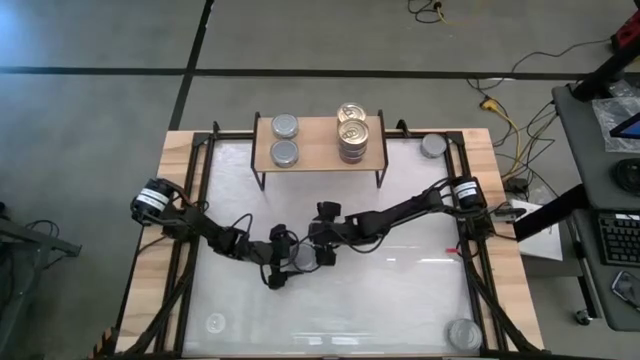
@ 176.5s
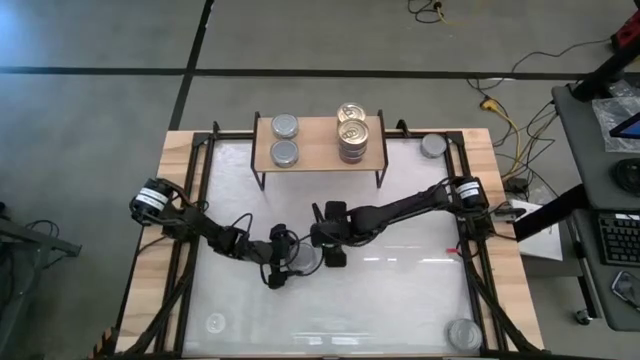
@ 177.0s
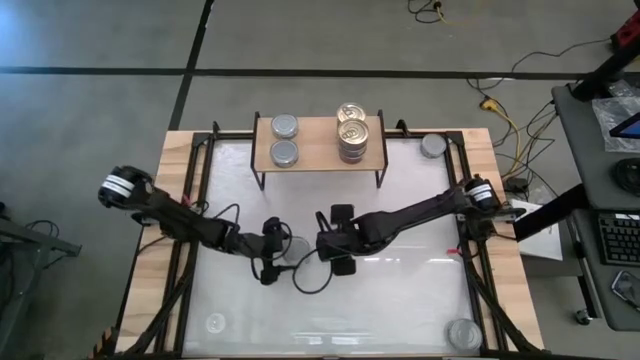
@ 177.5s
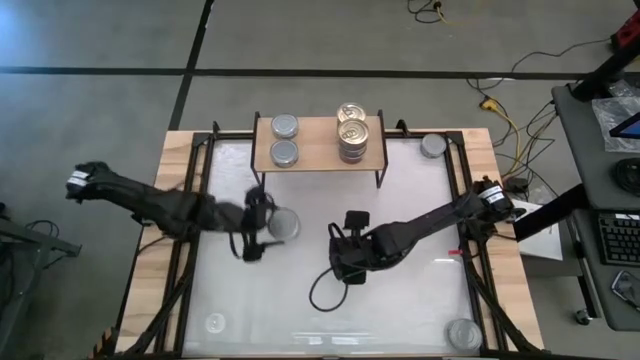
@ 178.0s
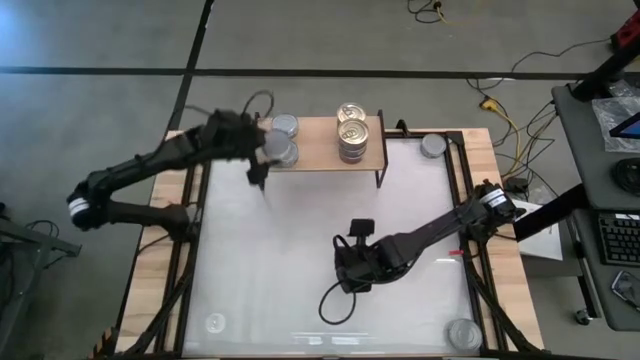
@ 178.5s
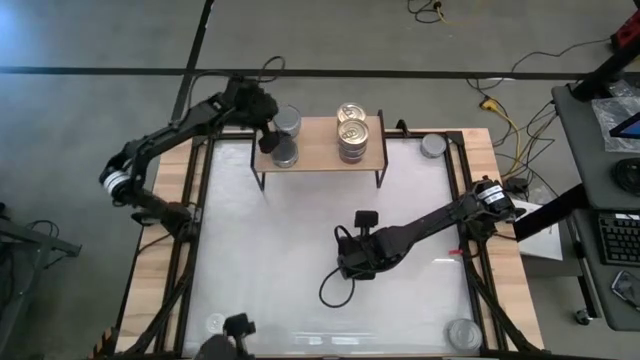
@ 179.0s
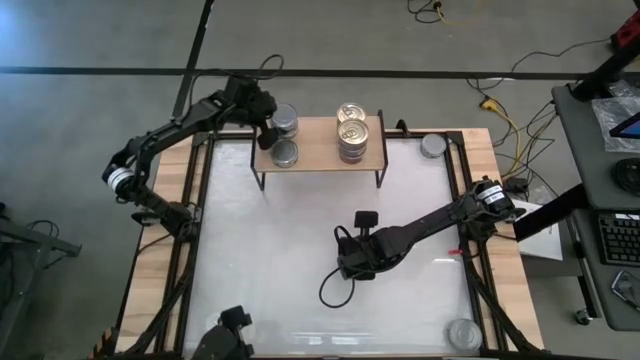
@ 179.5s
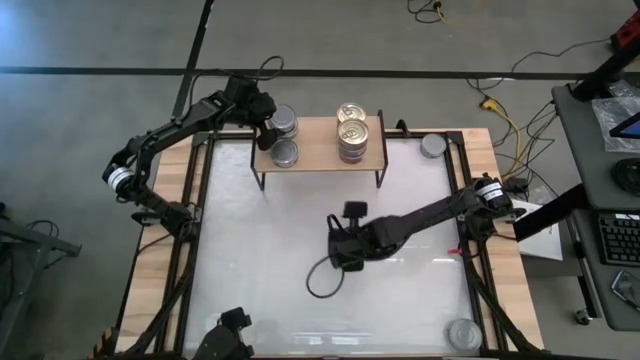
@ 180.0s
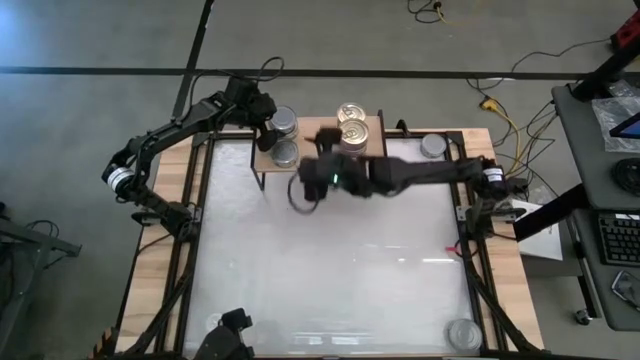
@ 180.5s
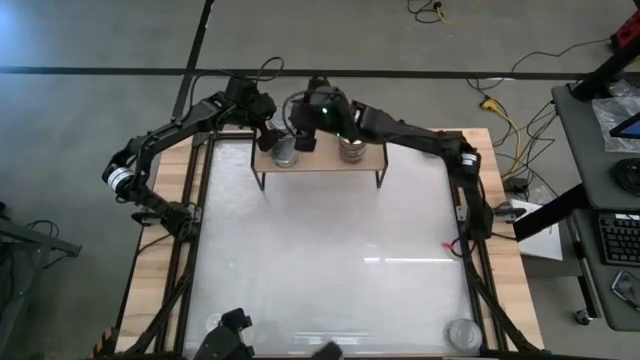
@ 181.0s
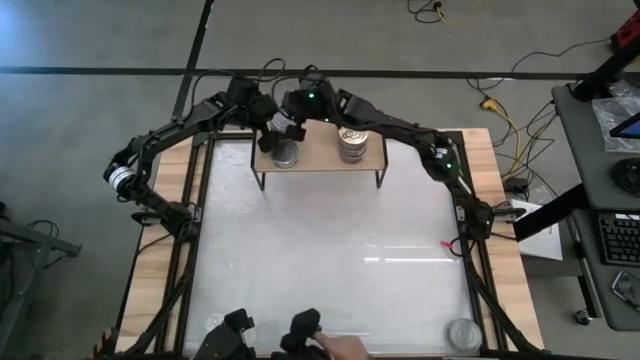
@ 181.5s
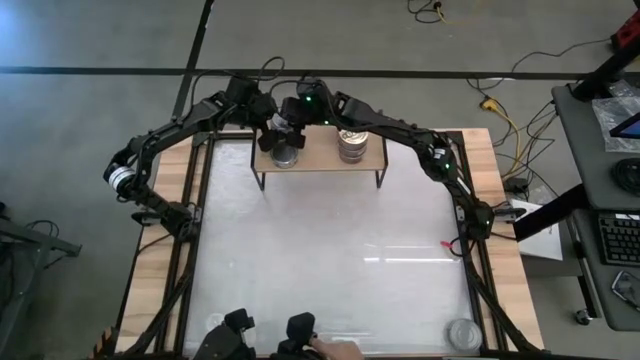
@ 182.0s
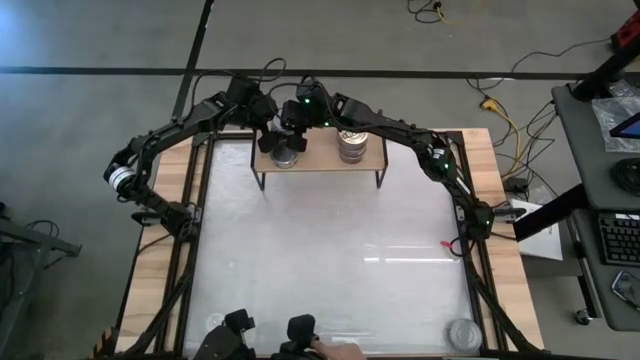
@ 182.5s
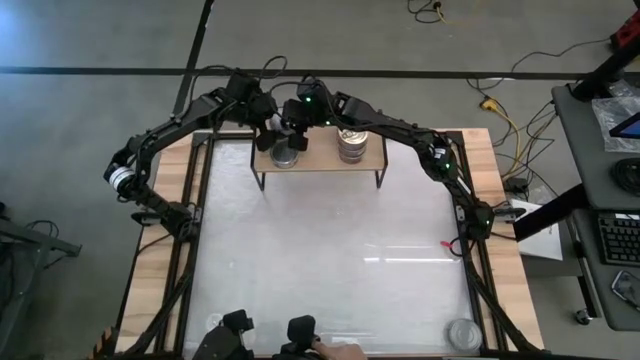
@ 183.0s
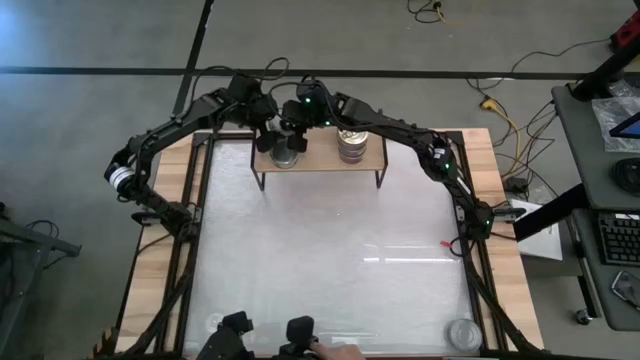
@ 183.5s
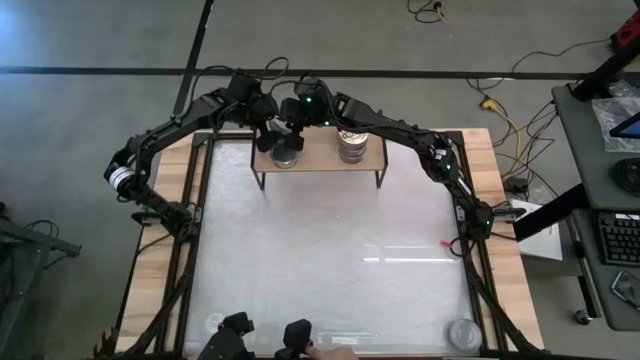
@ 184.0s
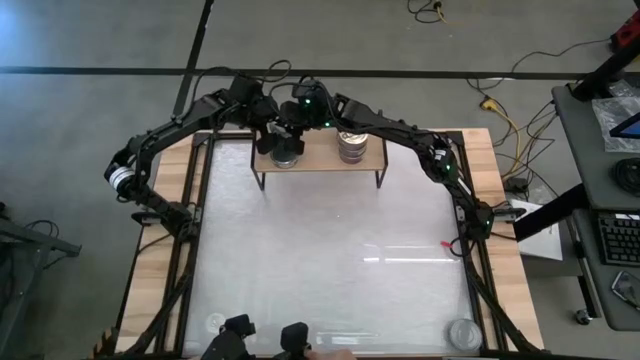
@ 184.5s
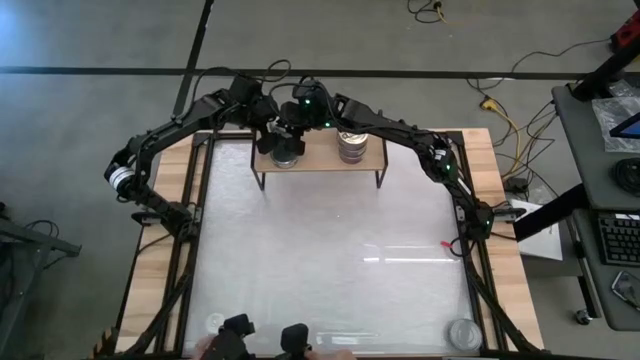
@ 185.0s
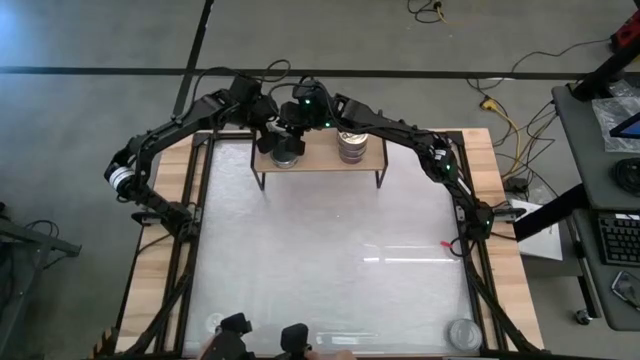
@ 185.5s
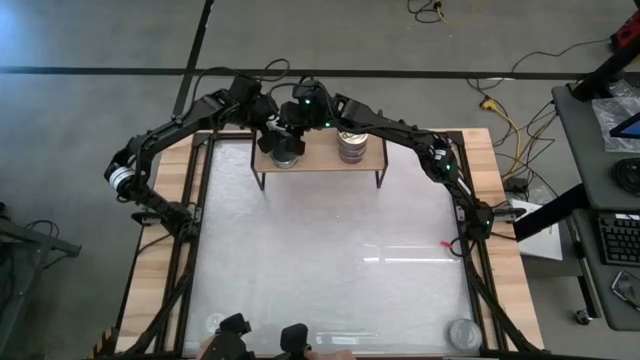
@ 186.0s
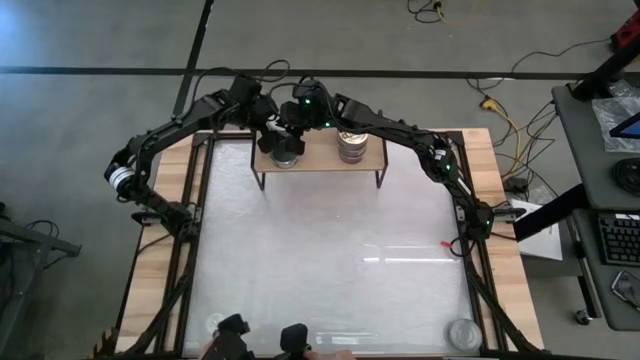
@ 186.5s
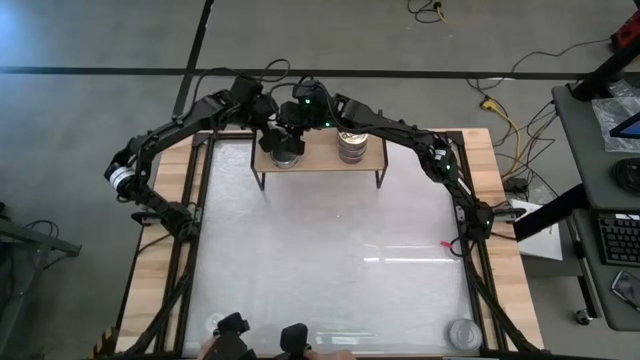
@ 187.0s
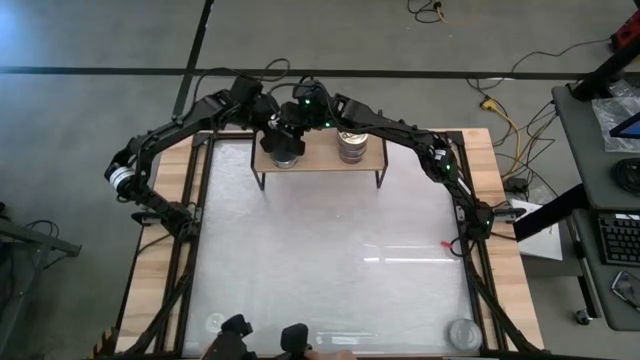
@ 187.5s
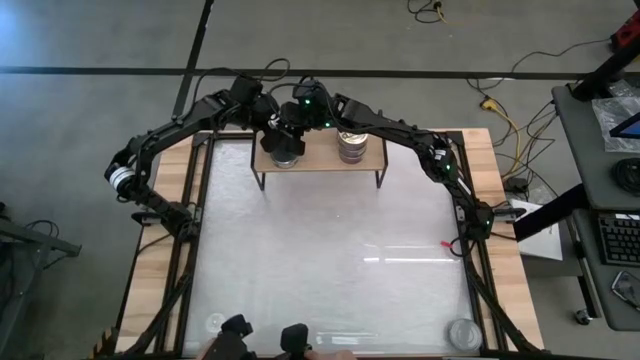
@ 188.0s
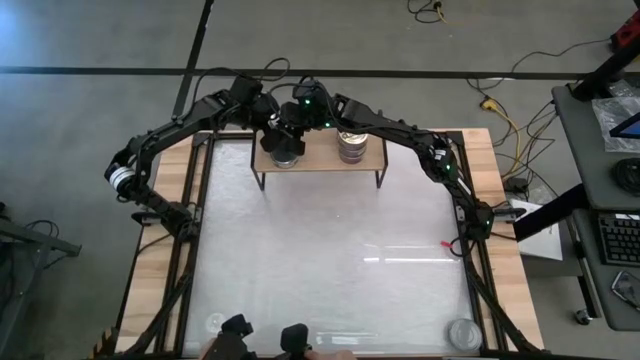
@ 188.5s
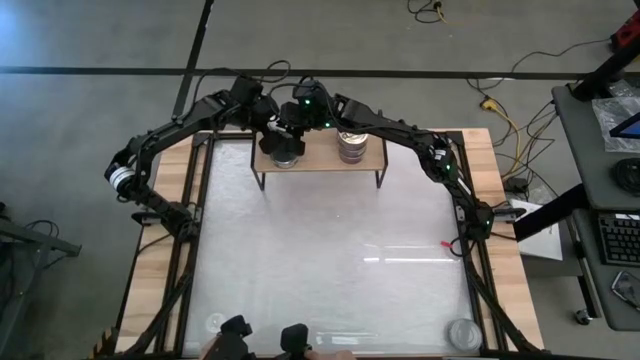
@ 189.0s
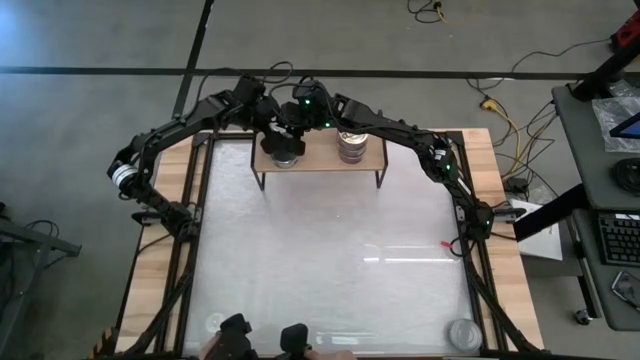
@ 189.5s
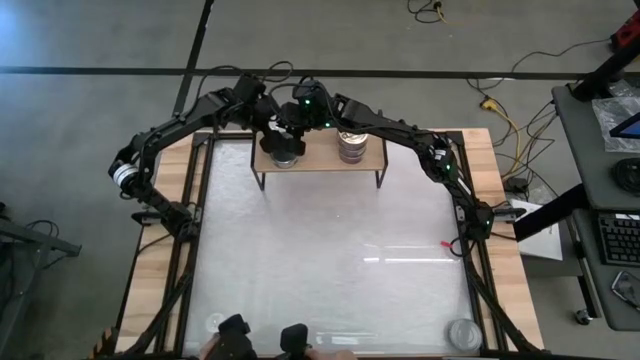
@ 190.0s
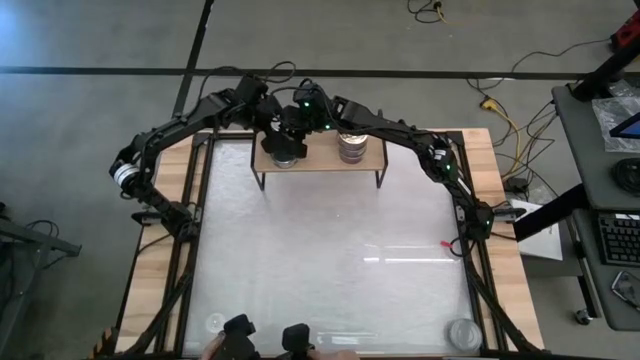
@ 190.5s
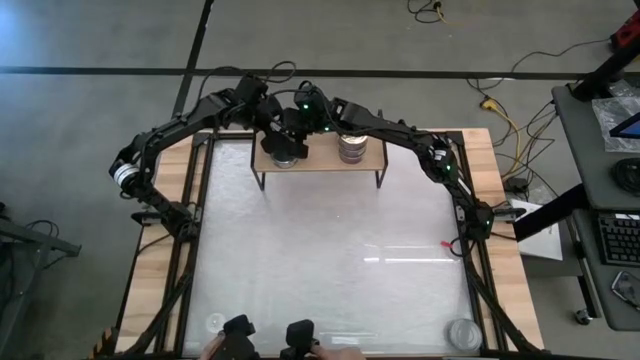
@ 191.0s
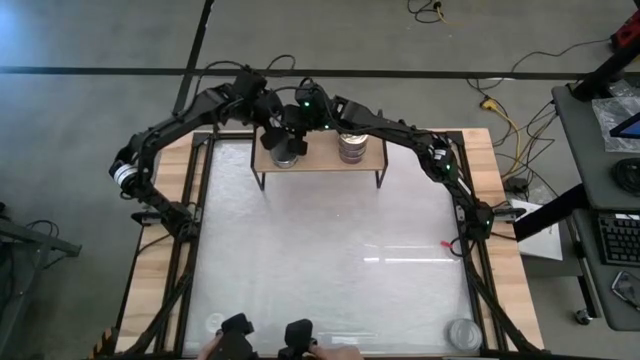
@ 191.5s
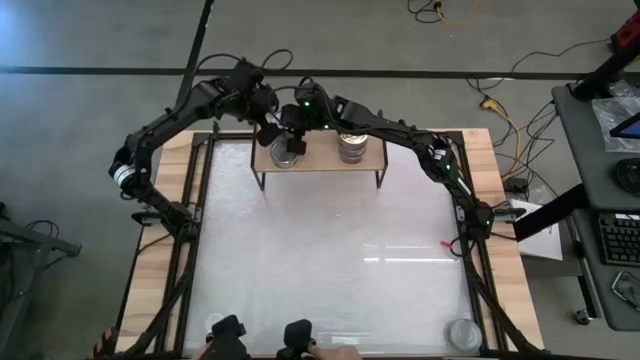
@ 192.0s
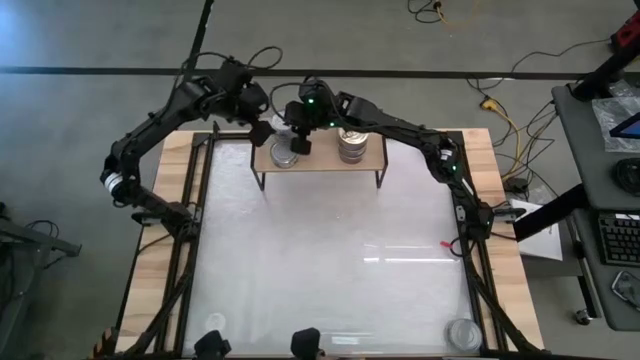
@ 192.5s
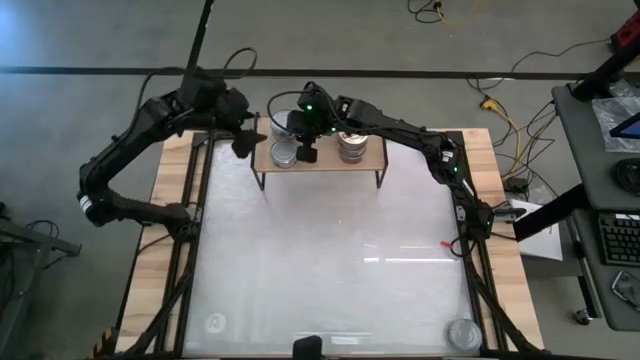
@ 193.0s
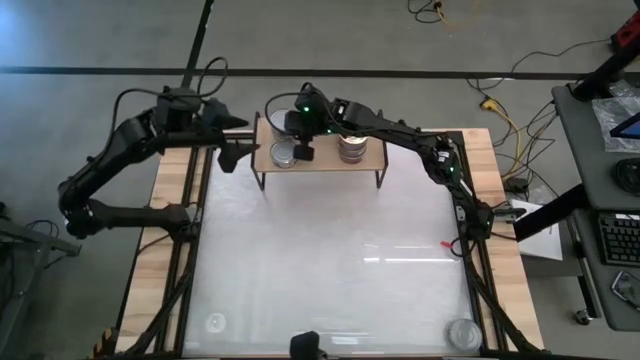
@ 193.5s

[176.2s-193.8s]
Task: Stack canned seafood by type on shelf
Stack the green tuna can on top of the other green tuna can on the shelf

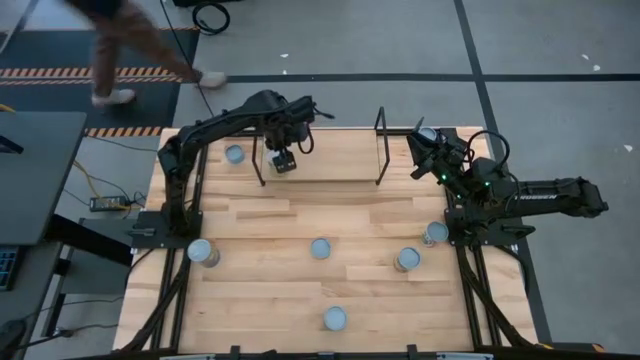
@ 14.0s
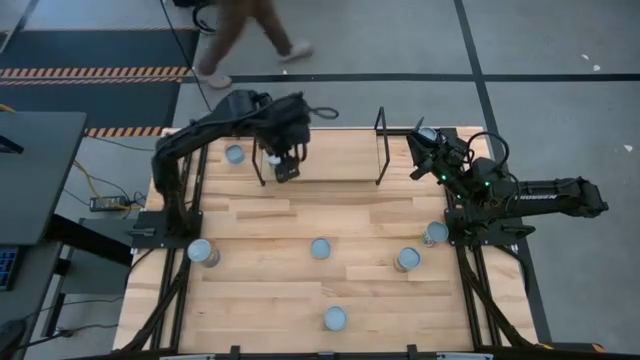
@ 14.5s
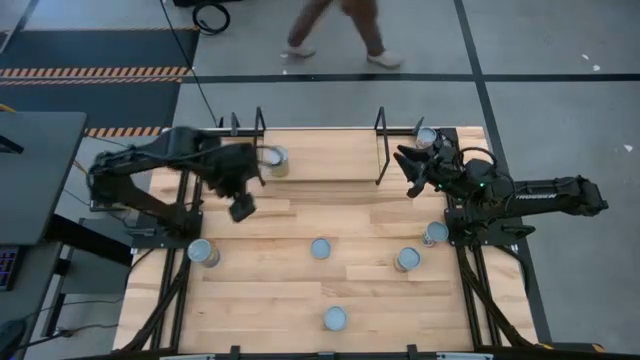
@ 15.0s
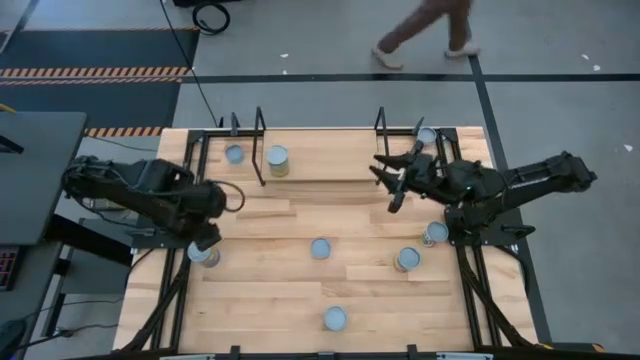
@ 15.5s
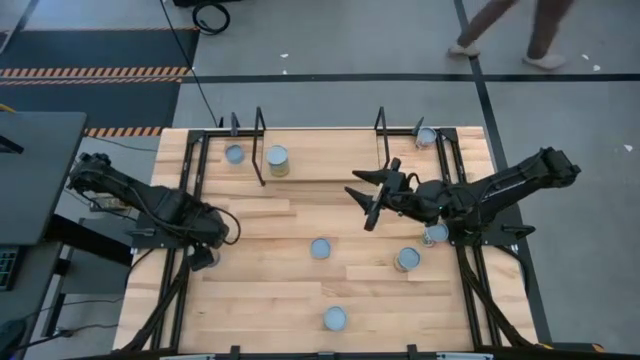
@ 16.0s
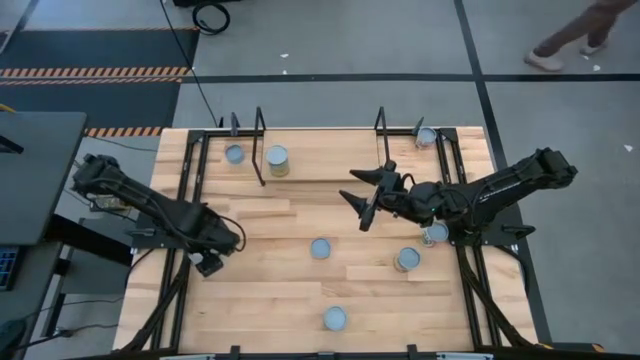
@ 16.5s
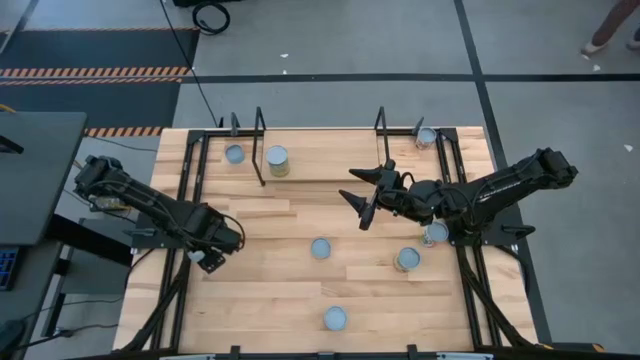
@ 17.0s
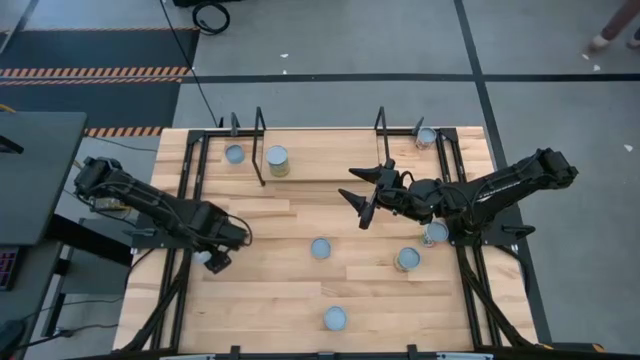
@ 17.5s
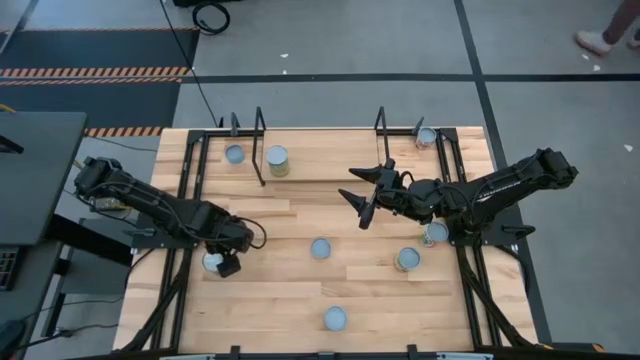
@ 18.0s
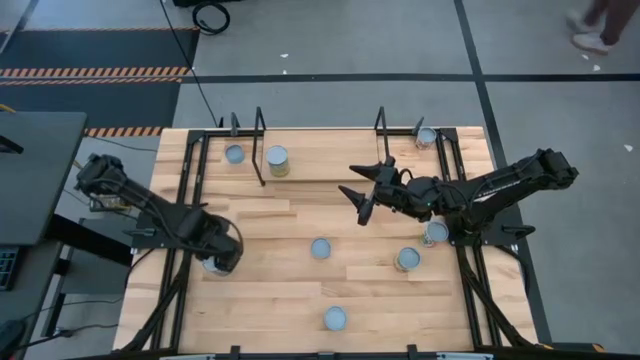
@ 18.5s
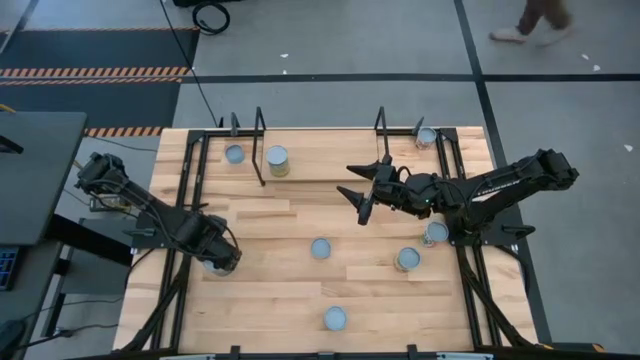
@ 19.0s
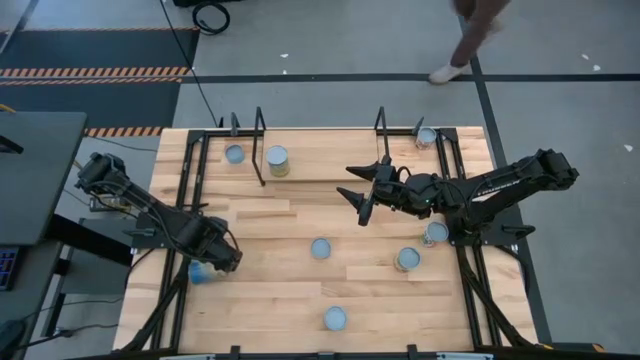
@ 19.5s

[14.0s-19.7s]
Task: Pick and place cans onto a shelf
Put the blue can on the shelf aligned with the light orange can
